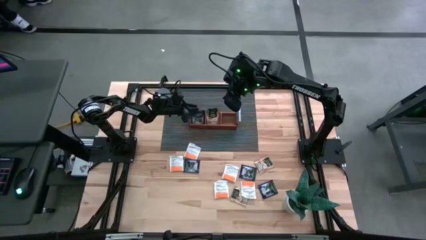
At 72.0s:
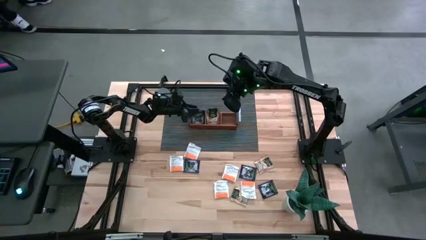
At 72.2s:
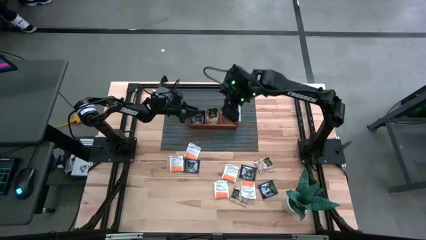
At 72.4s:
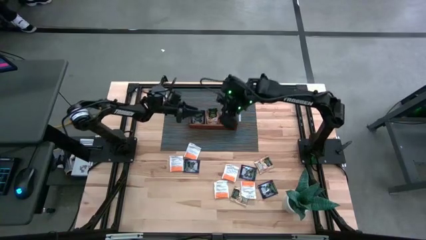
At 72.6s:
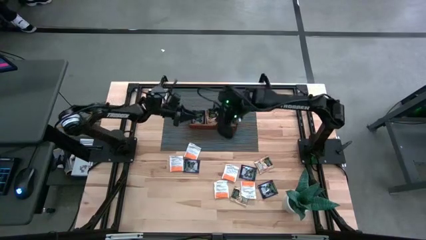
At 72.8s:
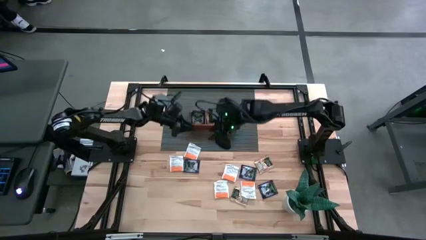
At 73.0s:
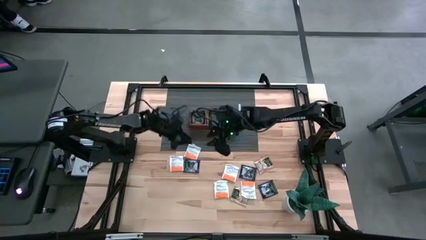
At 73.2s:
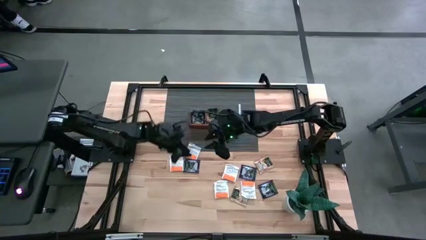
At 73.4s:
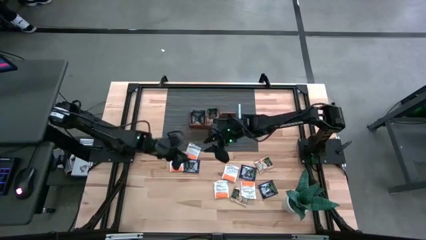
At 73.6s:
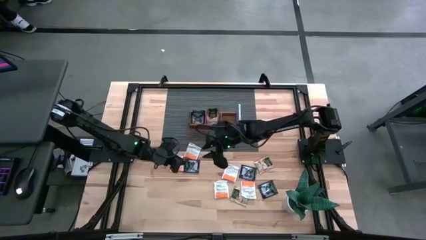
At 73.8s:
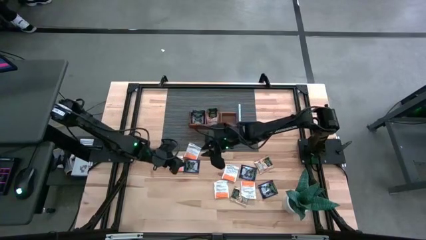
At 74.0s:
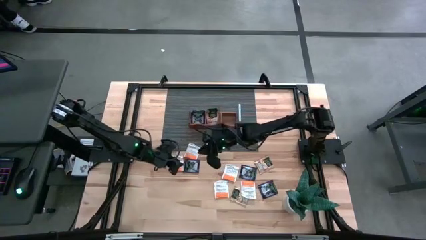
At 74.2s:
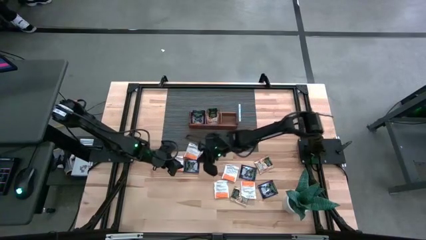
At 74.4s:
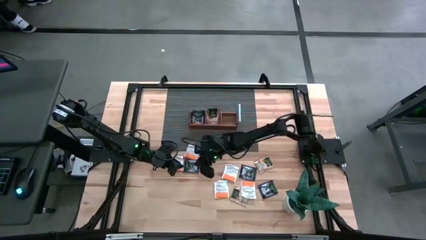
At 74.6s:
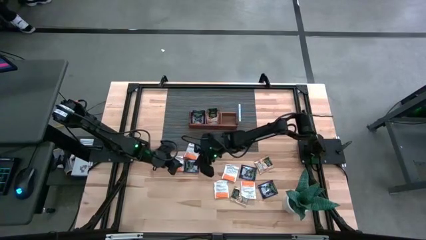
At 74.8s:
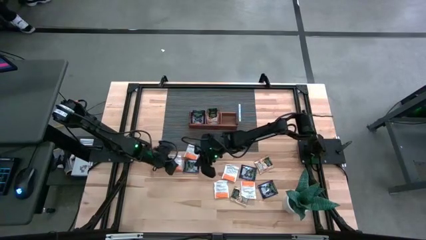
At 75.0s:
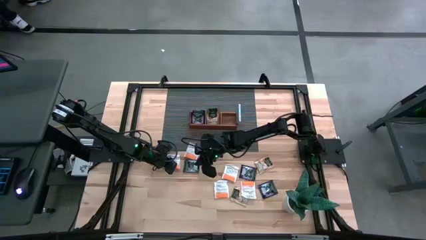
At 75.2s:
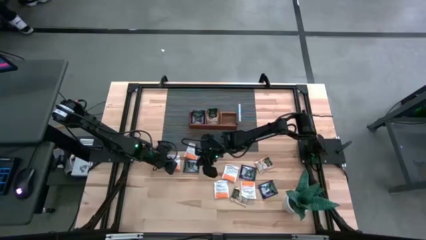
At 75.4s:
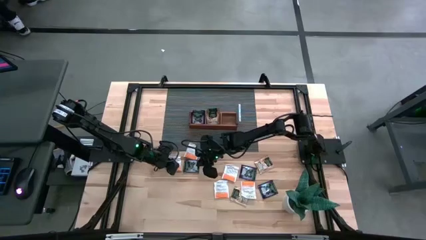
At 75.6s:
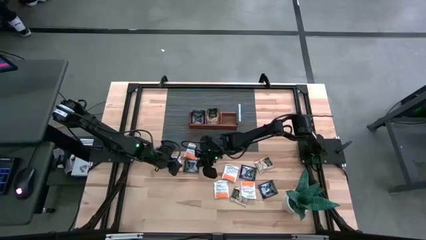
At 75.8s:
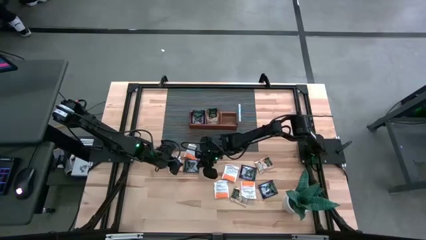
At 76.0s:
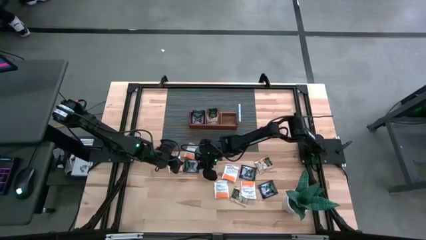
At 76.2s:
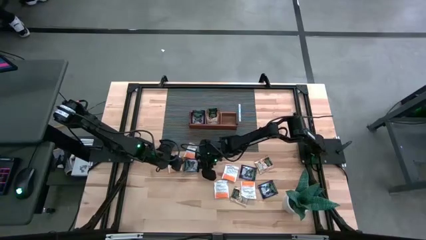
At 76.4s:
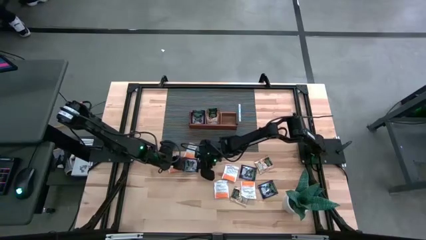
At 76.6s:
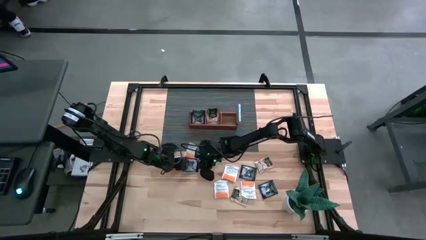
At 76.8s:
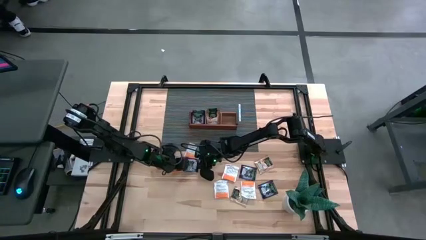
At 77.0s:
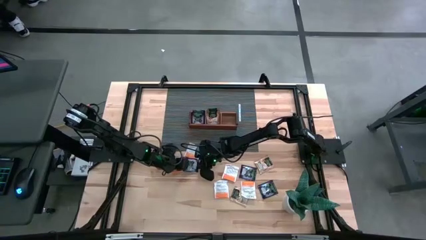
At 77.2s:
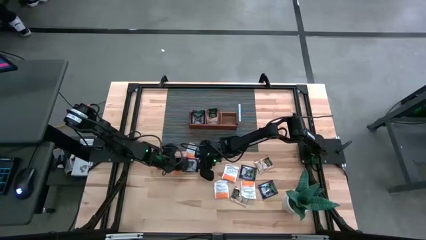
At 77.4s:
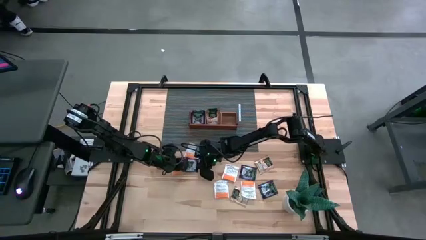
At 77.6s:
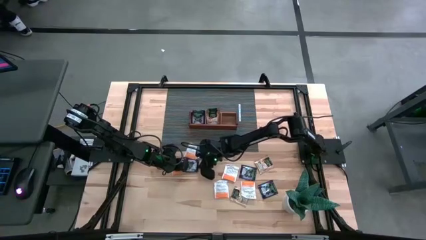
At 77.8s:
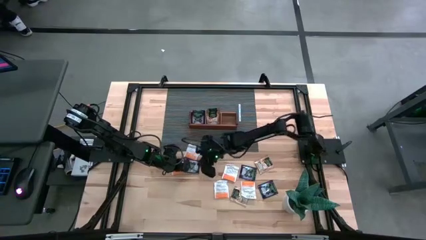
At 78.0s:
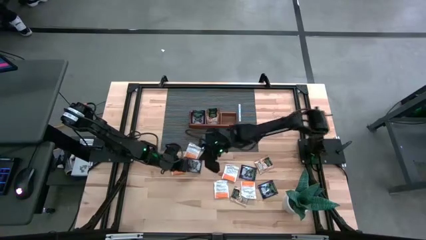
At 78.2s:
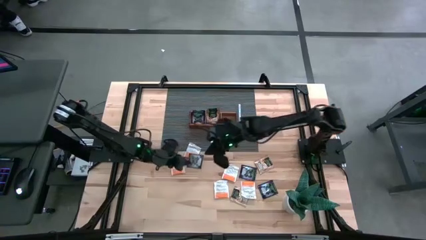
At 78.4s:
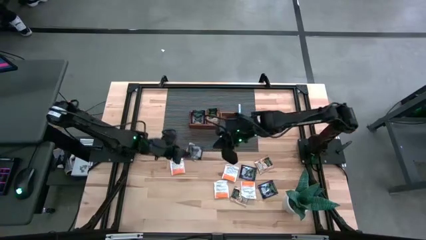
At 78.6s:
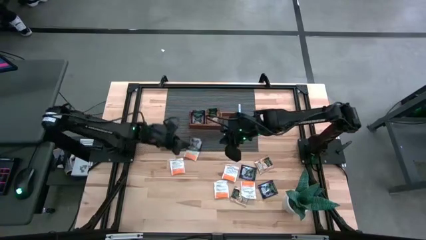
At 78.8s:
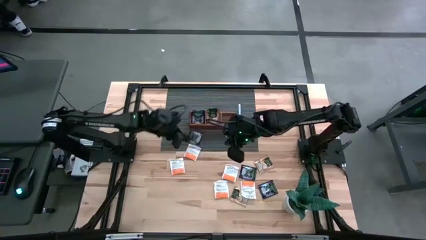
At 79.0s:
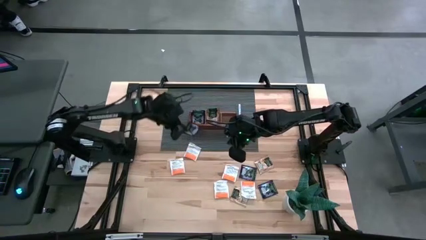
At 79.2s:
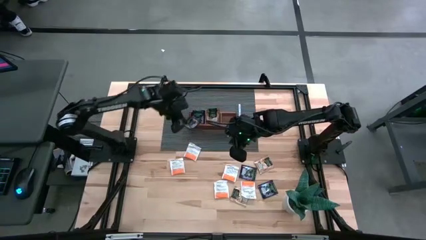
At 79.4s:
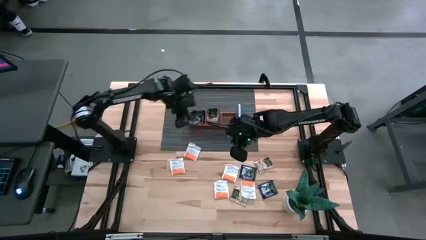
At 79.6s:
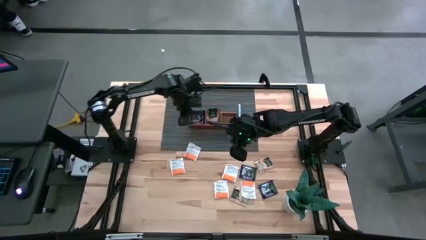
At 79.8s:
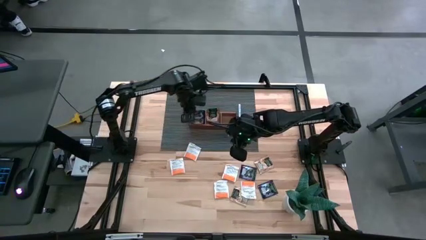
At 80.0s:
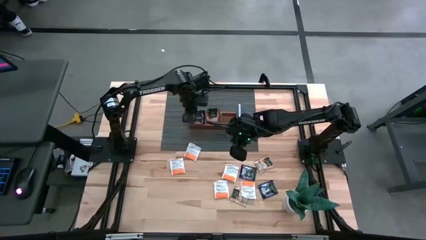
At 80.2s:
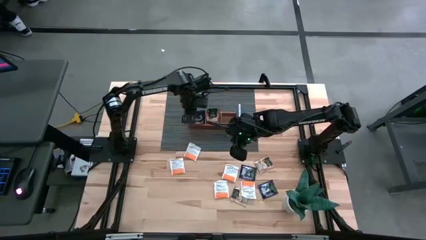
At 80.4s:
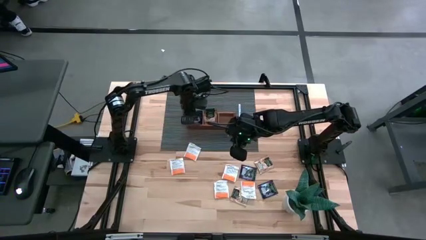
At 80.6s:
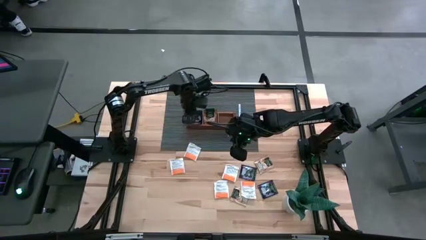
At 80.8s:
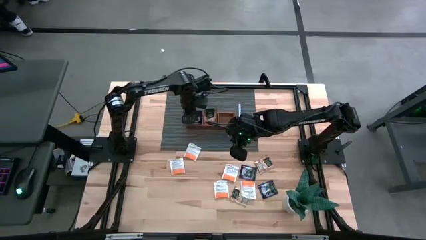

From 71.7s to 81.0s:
Task: Pick & Place Tea
Put the violet tea bag into the left section of the wooden organizer

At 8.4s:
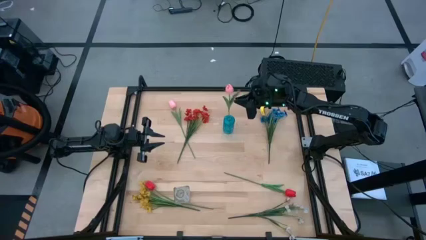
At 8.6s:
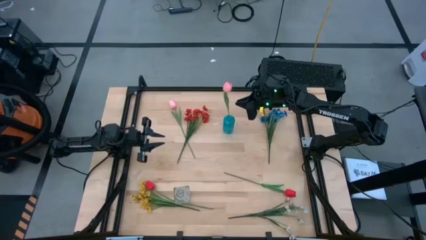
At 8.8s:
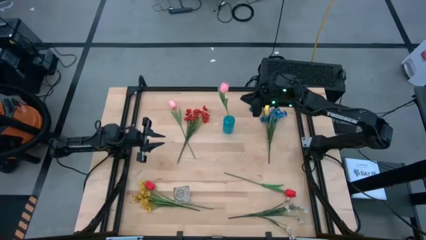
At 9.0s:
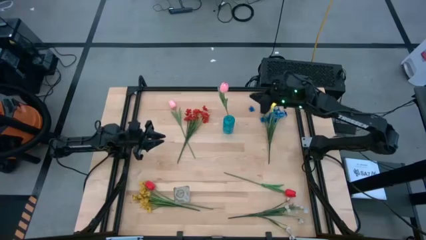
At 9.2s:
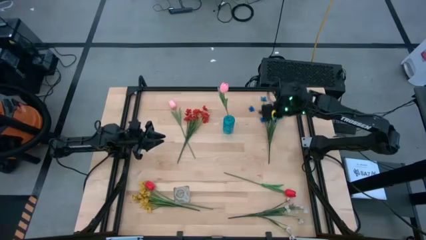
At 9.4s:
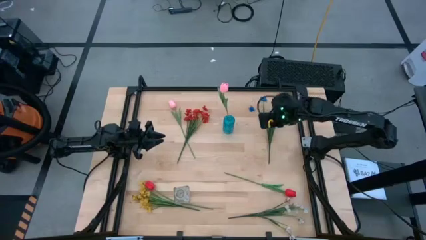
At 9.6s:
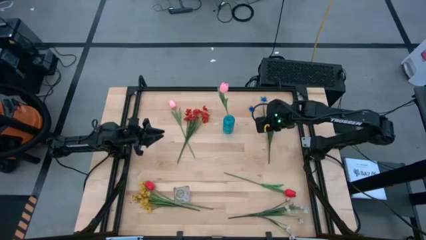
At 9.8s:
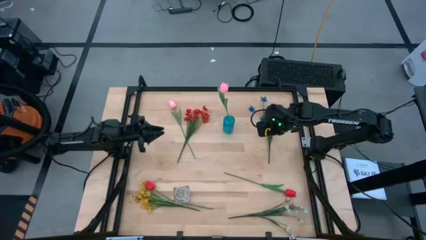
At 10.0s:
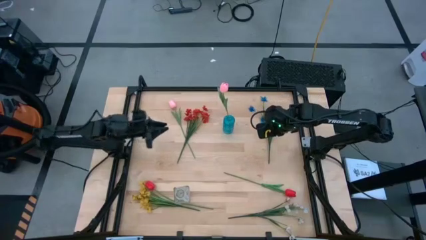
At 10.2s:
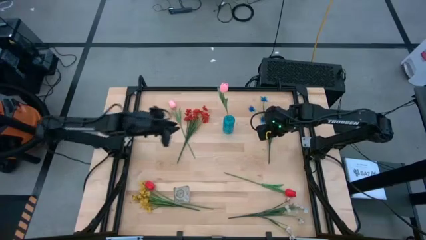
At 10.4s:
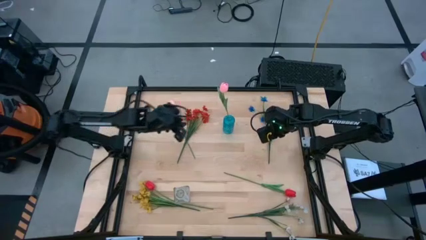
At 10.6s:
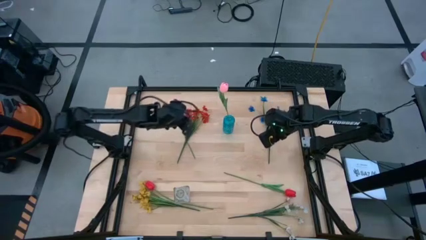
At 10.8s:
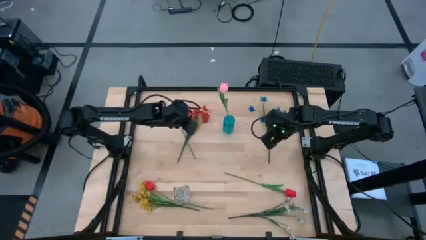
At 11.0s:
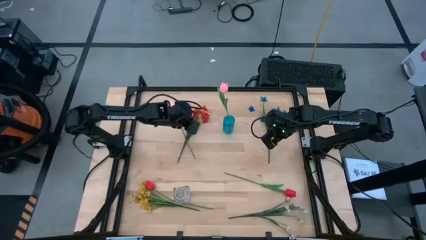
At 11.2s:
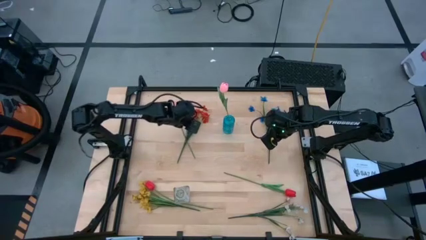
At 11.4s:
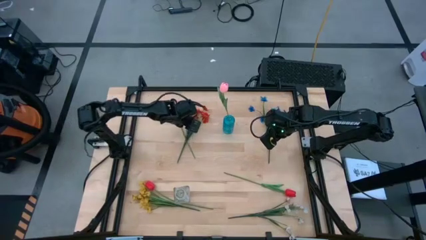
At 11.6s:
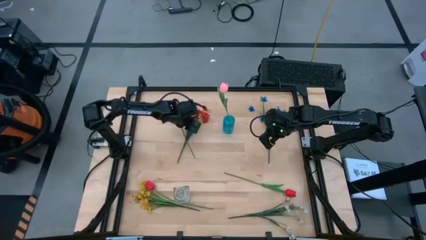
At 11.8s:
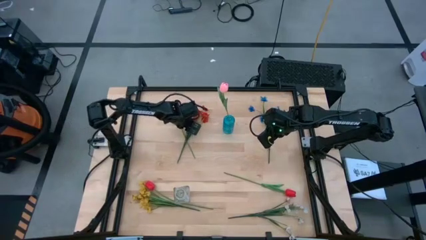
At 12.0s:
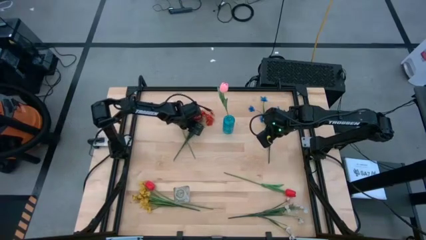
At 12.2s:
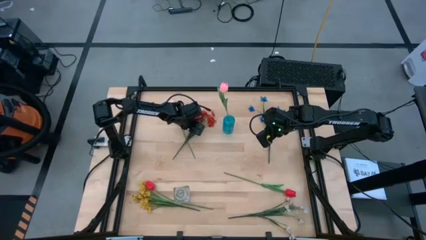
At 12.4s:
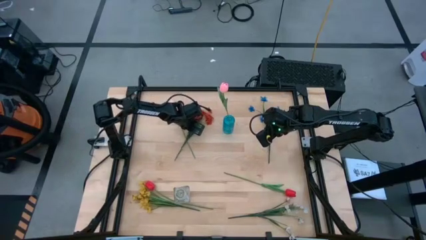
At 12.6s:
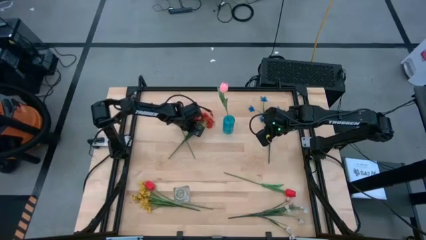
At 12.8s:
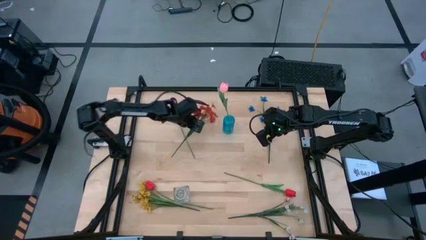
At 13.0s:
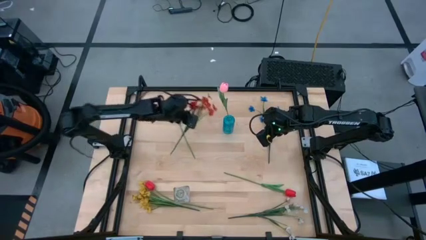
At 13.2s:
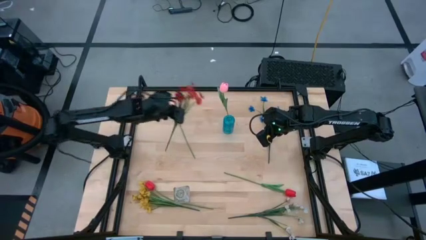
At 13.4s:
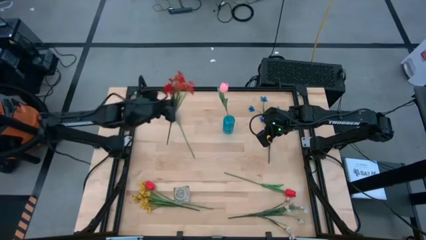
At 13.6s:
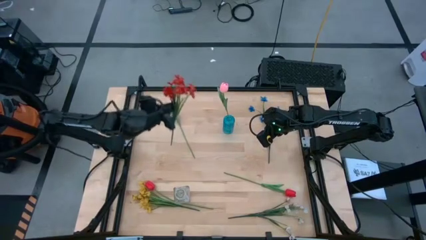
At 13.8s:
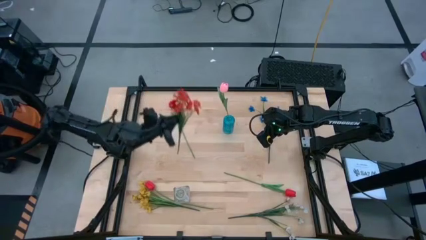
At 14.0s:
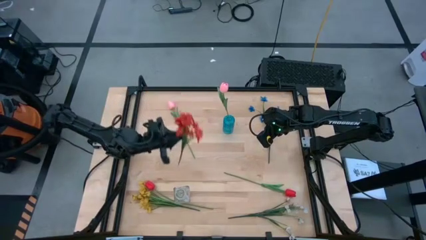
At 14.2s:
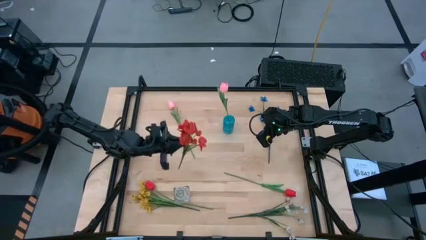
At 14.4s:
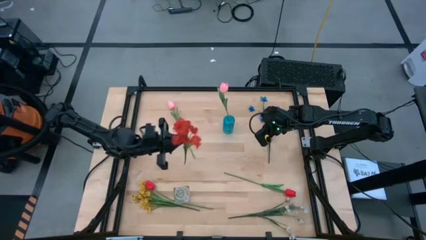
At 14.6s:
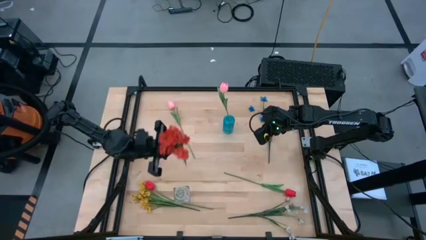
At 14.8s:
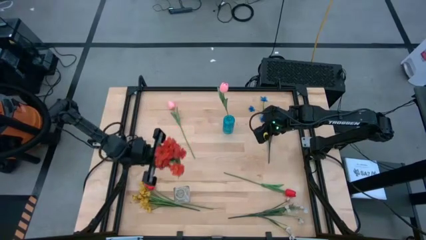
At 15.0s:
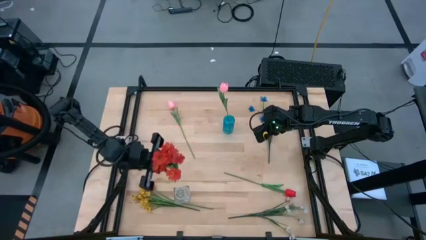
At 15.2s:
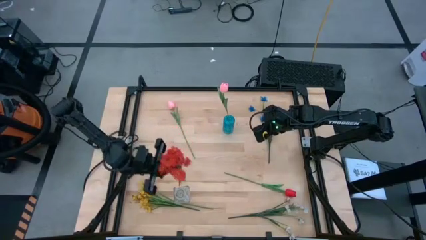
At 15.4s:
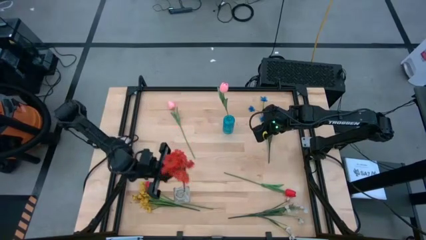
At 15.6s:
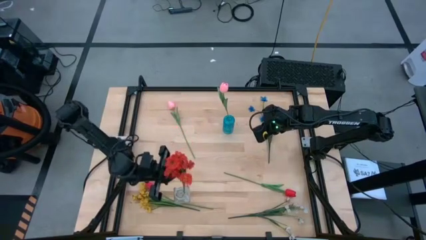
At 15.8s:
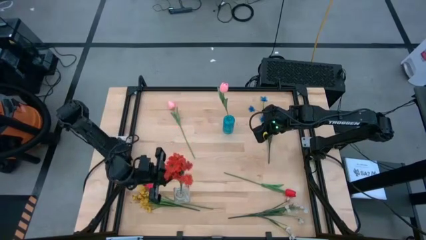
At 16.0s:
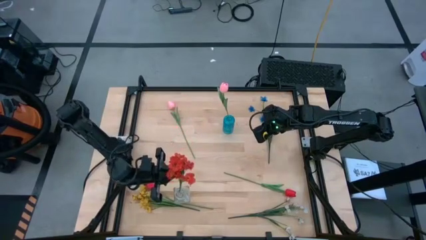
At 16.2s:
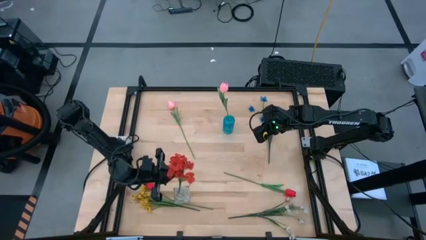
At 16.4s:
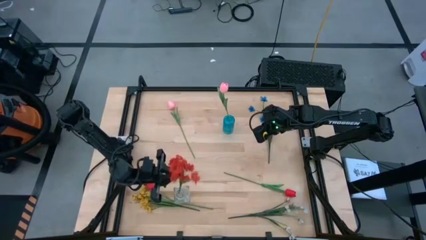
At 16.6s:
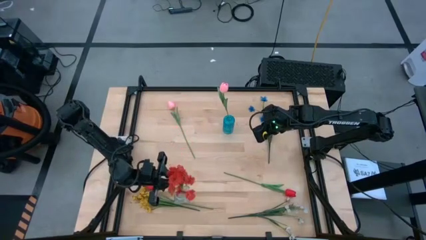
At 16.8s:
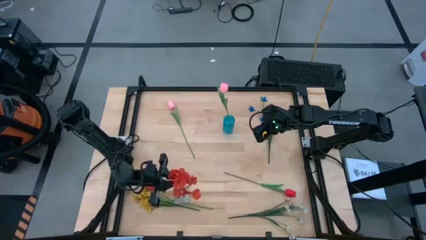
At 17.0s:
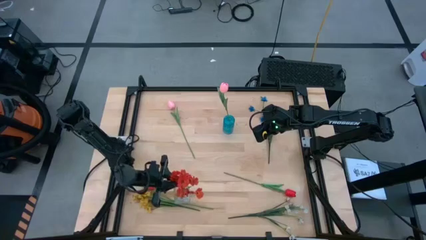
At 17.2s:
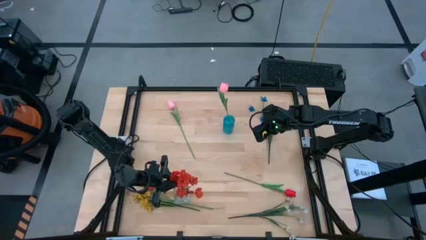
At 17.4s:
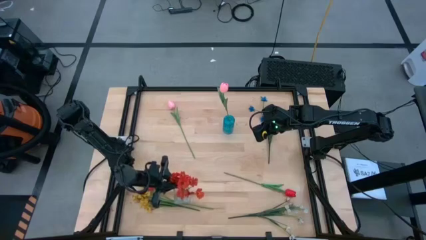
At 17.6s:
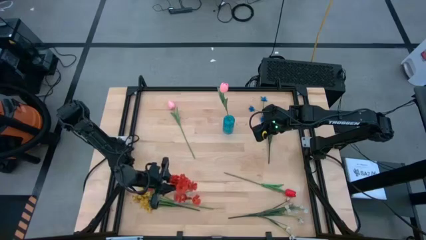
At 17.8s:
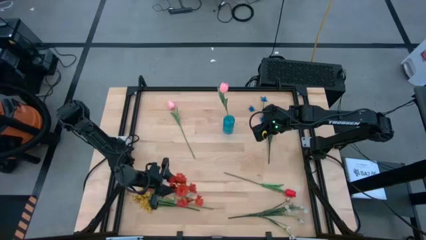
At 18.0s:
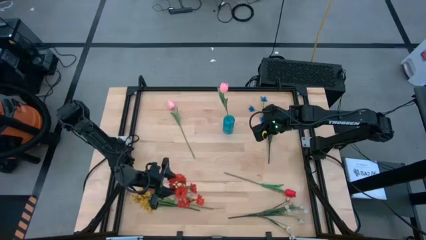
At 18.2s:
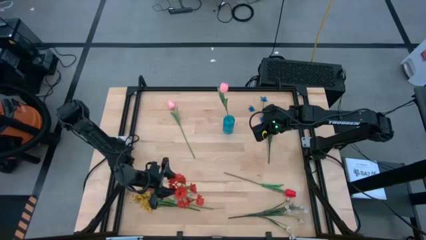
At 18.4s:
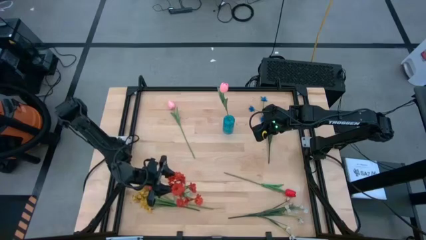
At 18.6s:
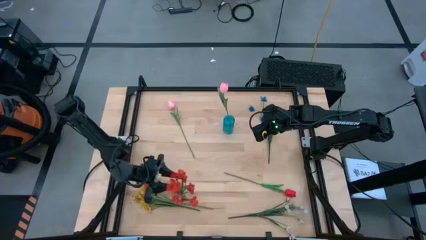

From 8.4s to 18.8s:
Task: Sort flowers into vase by color
Put the red flowers into the transparent vase
